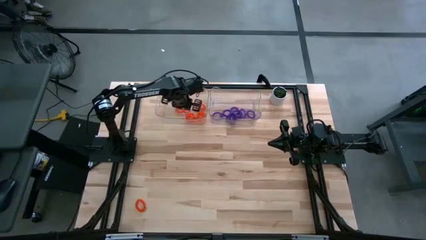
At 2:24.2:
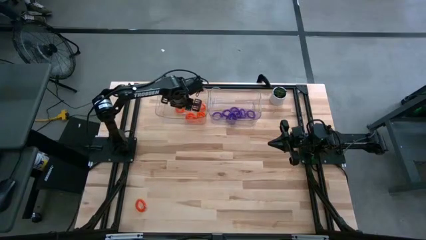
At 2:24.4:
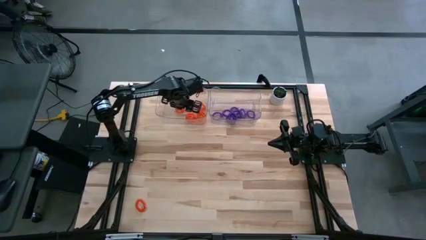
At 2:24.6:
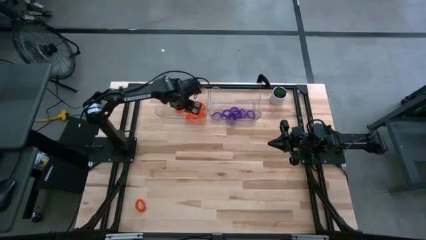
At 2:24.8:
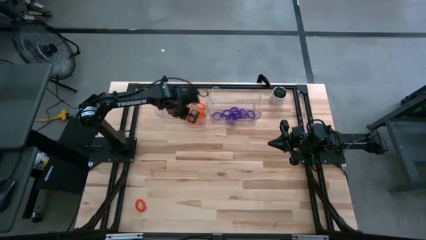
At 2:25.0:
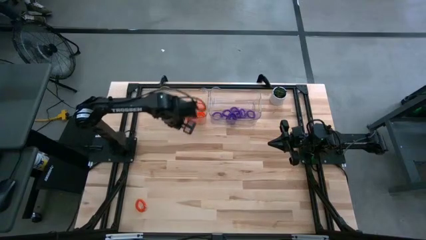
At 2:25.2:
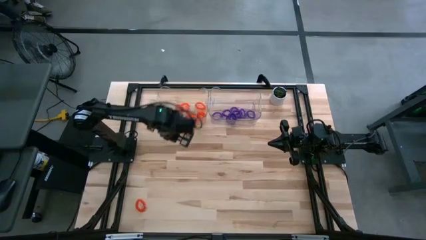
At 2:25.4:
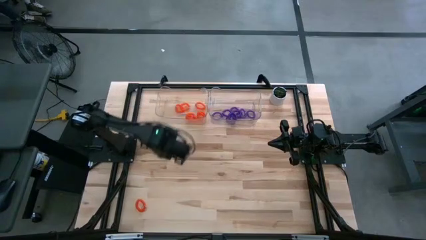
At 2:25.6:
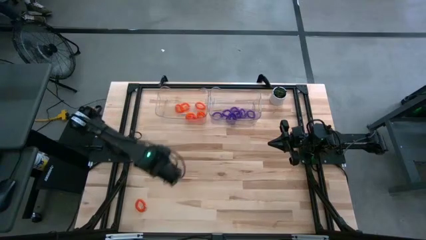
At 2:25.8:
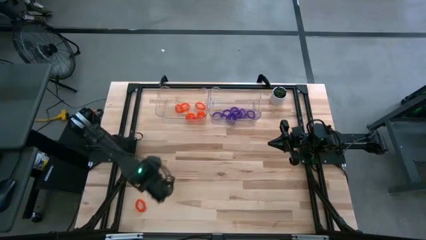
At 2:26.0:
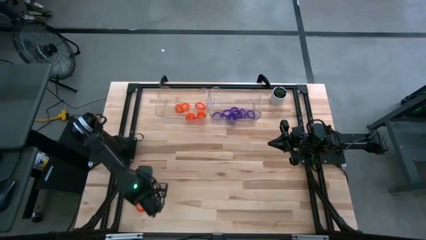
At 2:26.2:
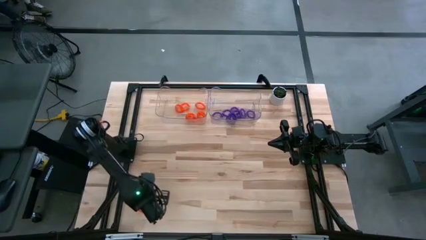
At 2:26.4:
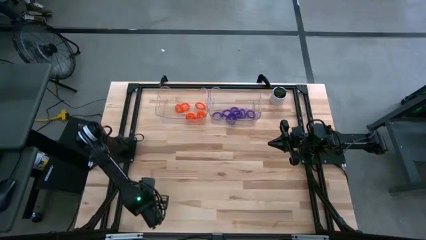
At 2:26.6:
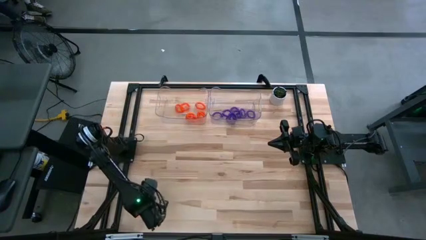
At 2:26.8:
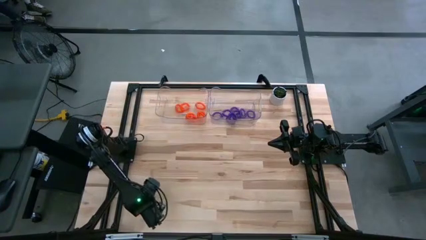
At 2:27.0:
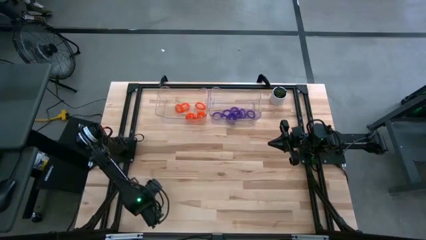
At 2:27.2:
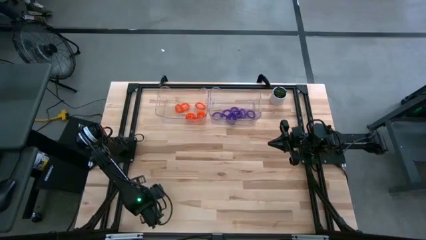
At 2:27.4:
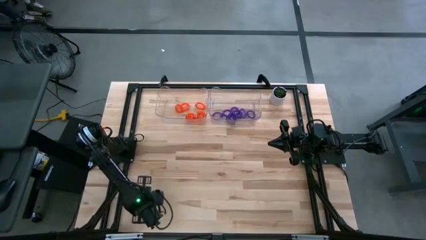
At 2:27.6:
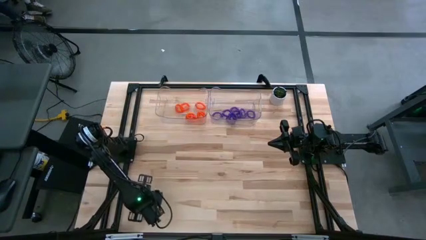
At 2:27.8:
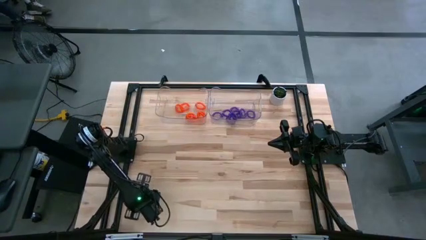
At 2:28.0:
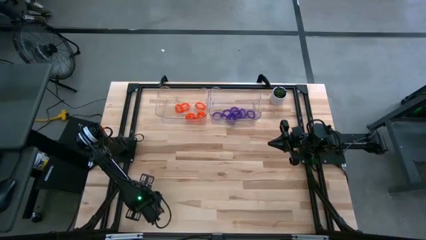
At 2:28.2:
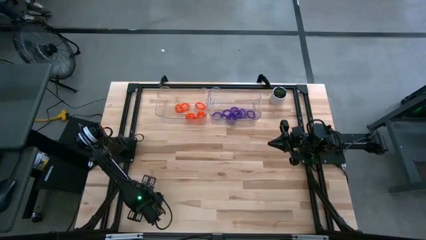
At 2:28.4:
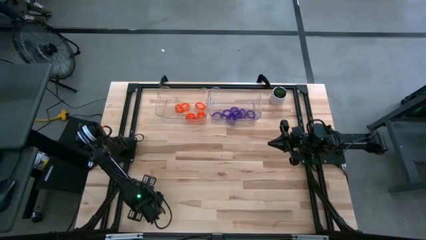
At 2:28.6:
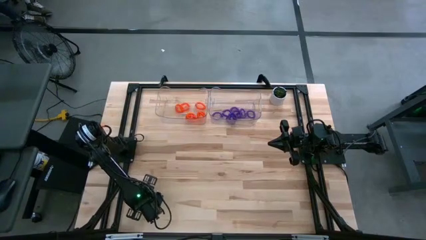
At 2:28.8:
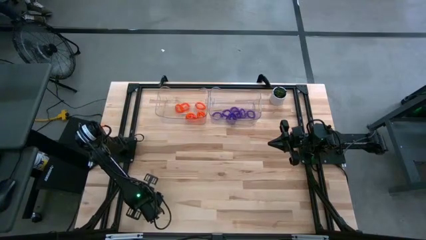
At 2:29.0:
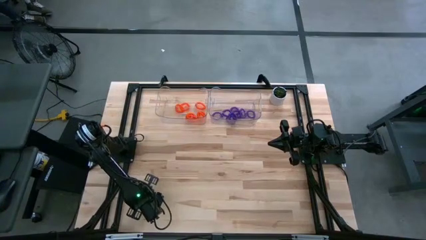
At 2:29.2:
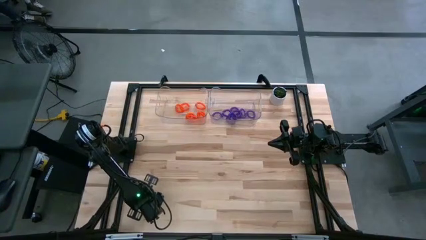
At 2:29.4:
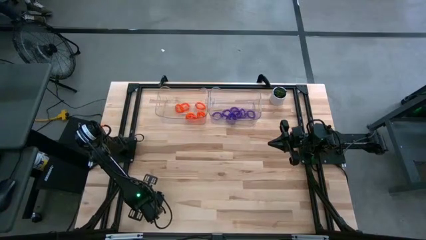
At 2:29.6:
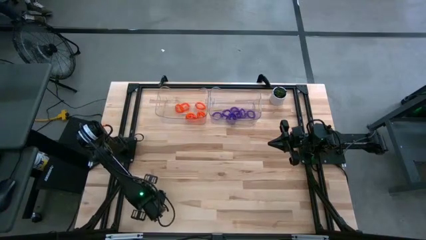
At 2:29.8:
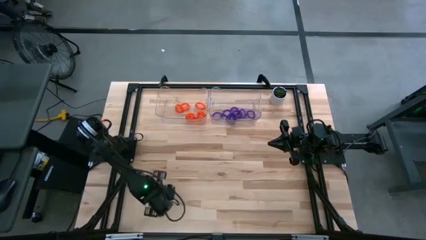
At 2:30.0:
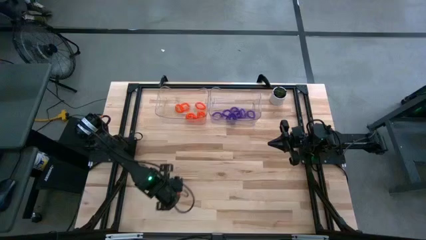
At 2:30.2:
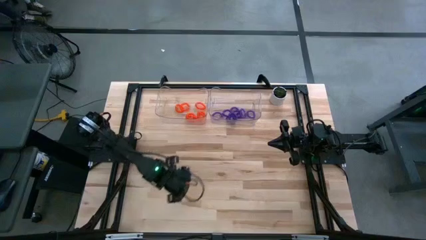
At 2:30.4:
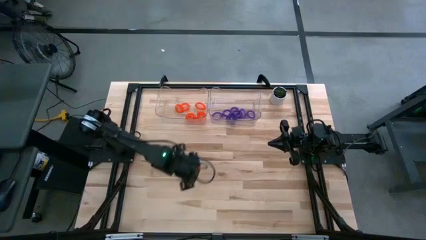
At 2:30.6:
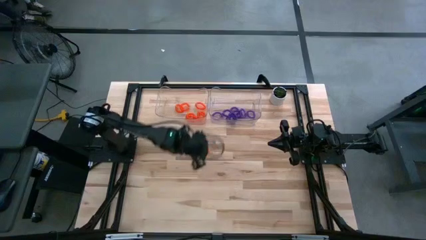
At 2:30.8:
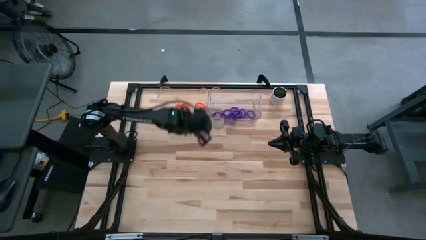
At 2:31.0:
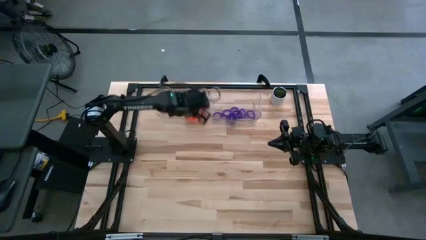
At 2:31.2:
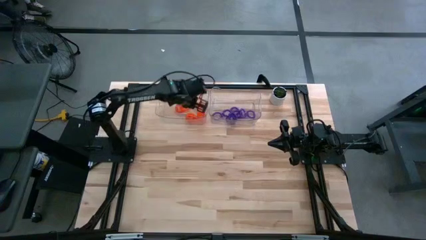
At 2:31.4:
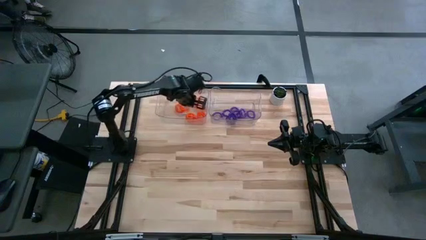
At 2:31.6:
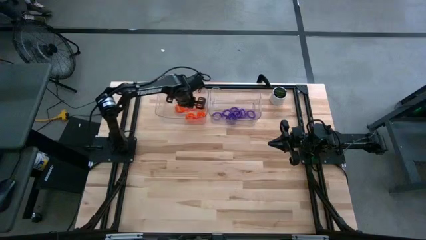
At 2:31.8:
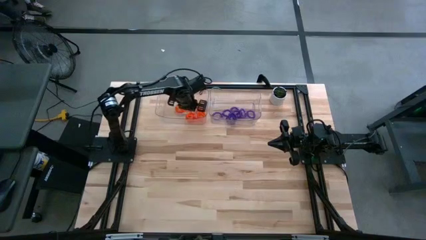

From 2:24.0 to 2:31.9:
Task: Sort spring keychains
Put the orange spring keychain into the left transparent bin

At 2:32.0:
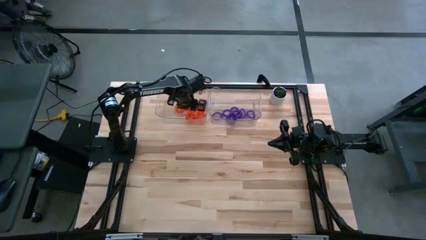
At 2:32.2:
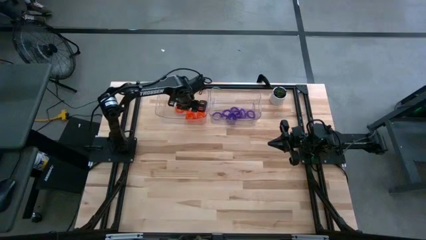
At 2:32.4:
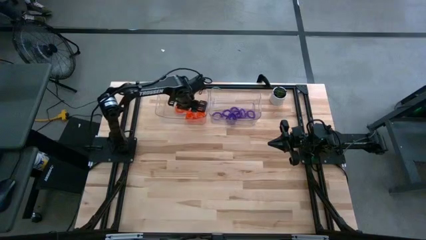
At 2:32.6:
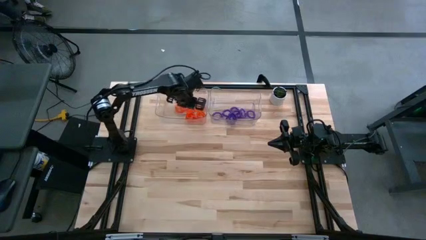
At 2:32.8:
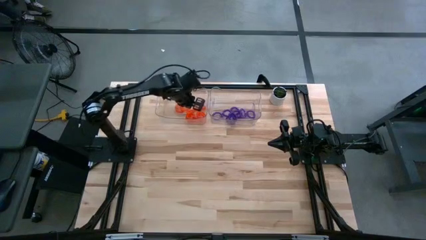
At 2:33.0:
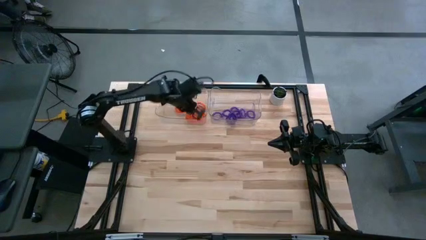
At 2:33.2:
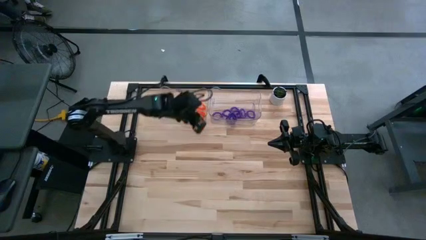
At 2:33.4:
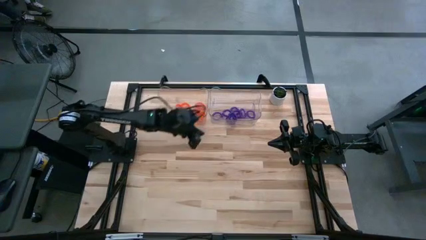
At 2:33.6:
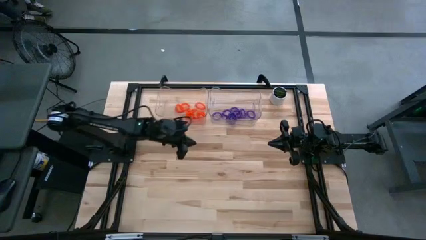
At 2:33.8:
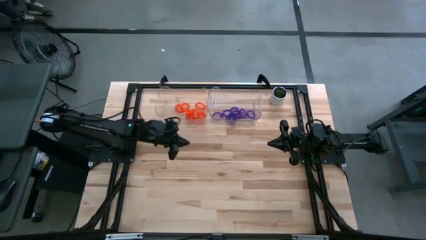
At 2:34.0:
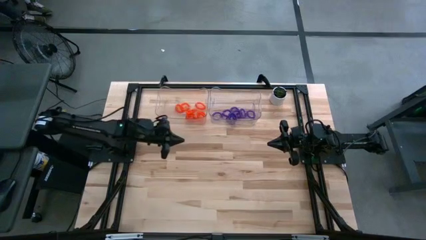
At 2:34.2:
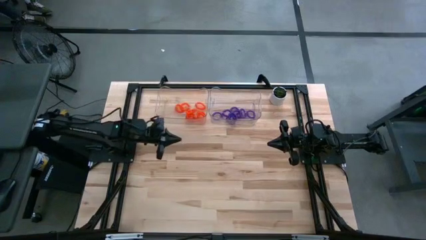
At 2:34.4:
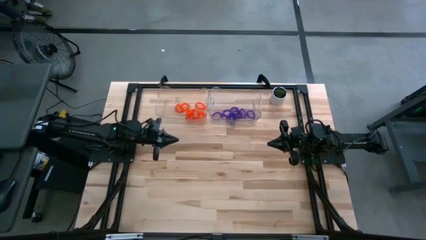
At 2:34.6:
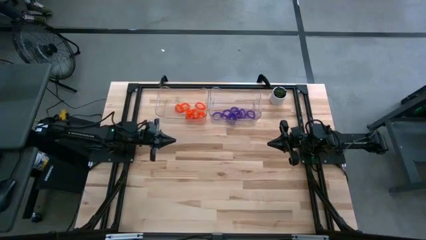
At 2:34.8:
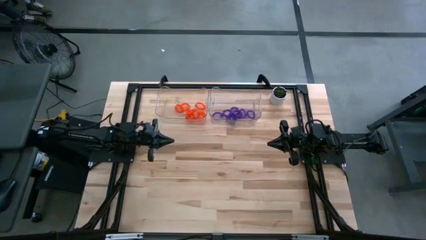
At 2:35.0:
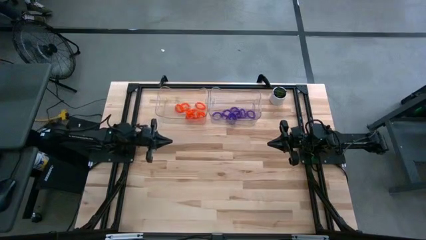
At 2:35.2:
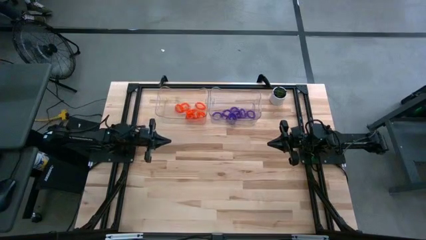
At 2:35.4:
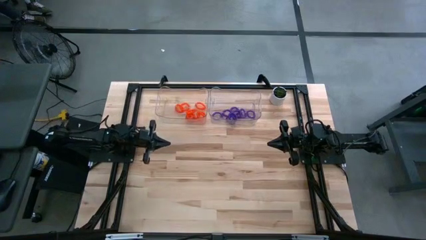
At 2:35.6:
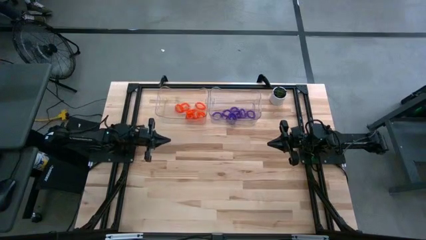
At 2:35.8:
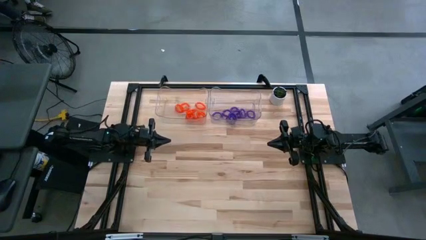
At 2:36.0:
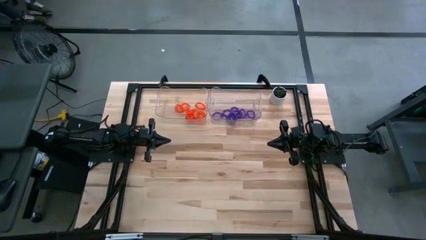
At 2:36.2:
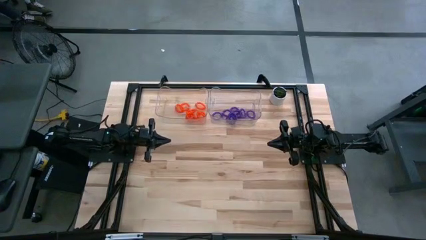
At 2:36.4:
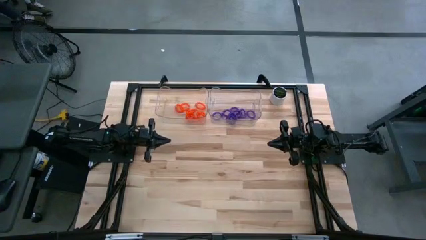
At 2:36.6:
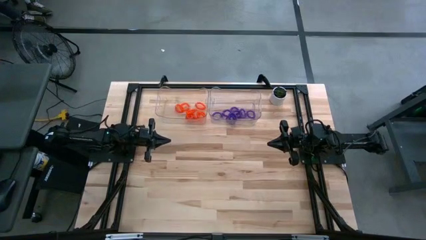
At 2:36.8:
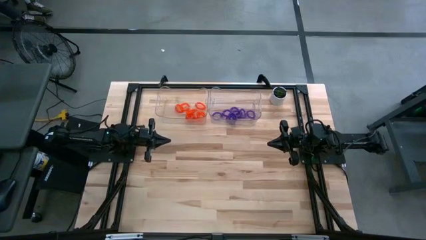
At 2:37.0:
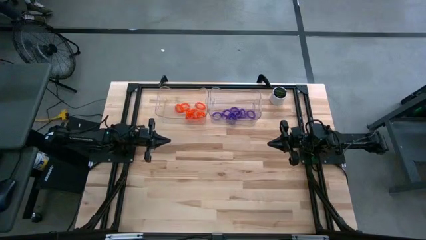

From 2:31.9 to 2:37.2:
Return to Home Position
